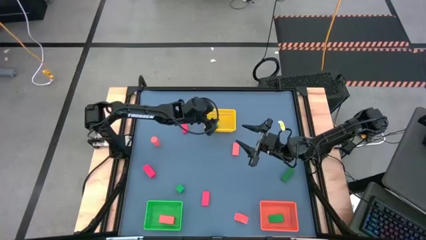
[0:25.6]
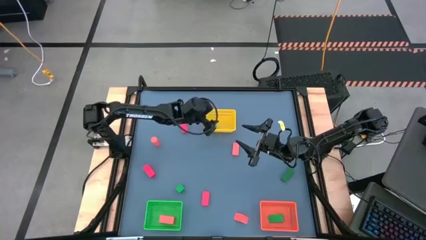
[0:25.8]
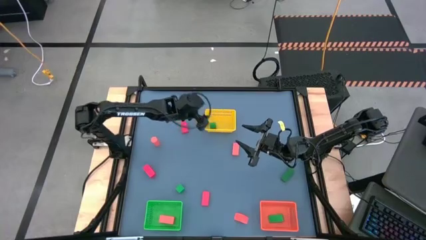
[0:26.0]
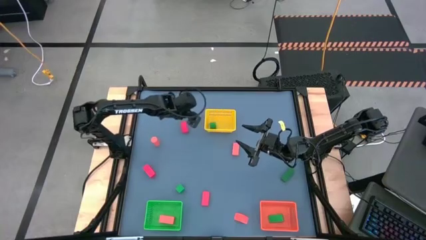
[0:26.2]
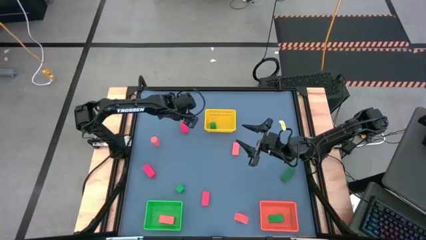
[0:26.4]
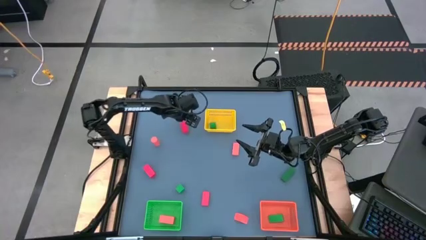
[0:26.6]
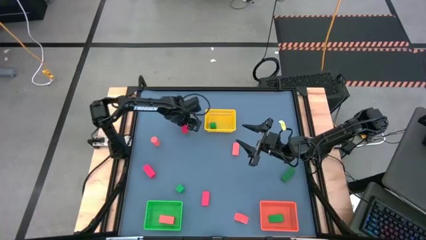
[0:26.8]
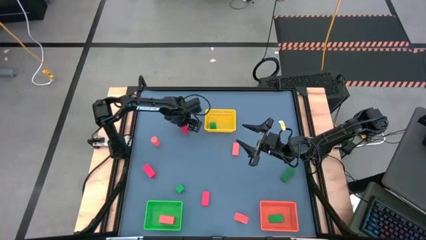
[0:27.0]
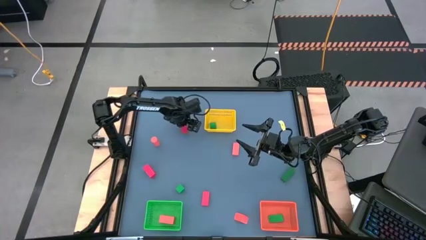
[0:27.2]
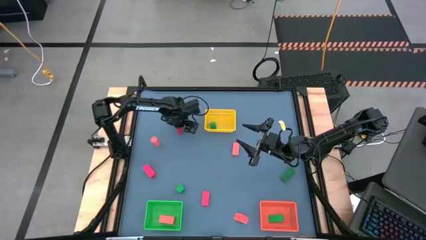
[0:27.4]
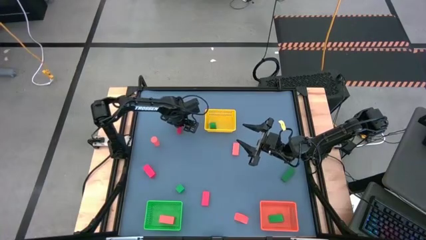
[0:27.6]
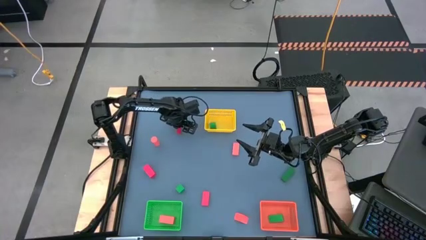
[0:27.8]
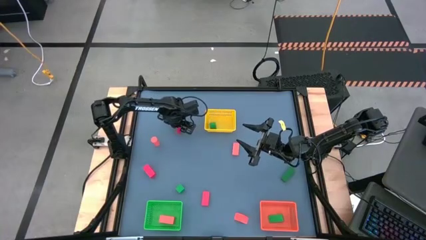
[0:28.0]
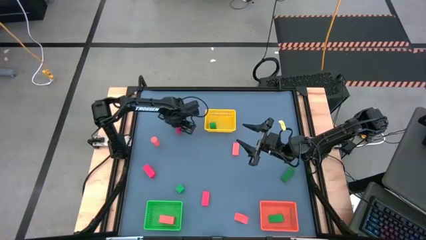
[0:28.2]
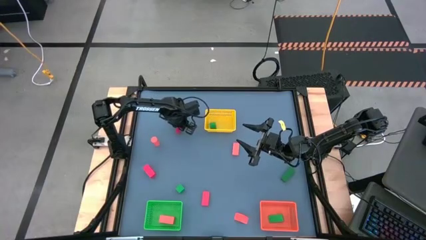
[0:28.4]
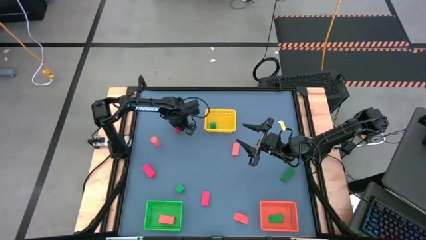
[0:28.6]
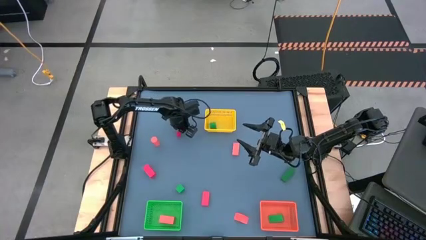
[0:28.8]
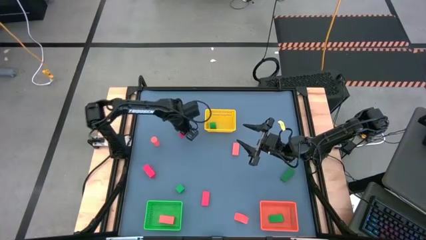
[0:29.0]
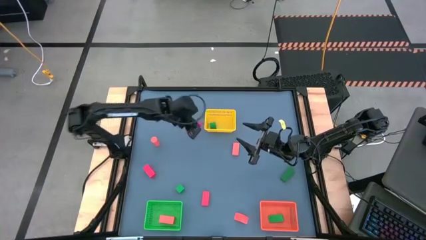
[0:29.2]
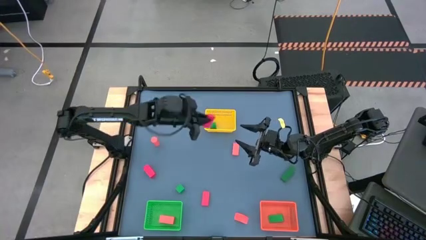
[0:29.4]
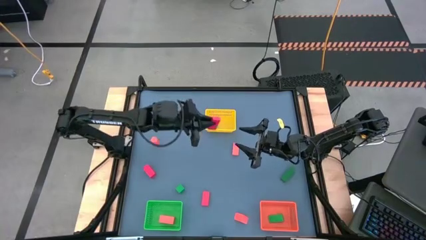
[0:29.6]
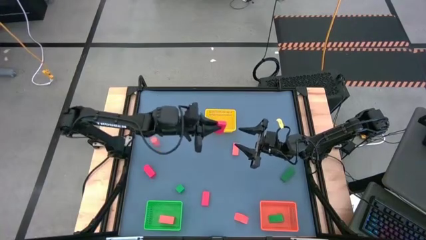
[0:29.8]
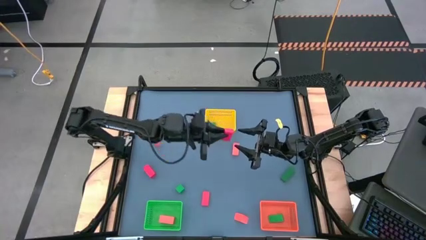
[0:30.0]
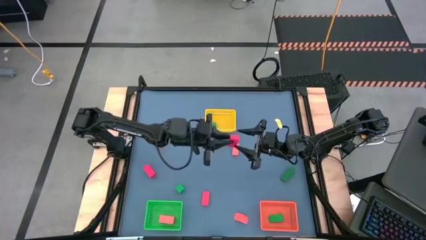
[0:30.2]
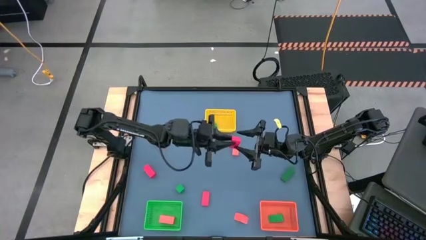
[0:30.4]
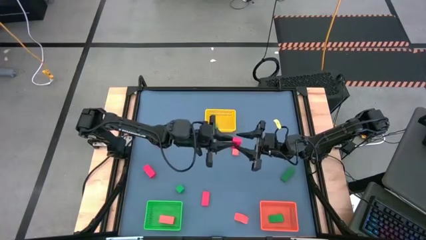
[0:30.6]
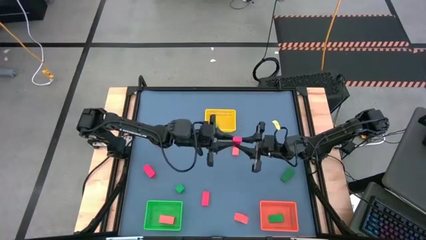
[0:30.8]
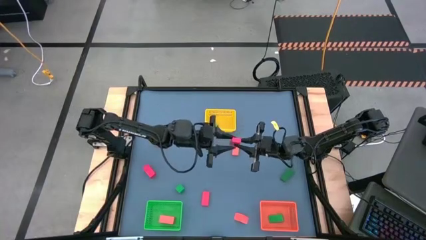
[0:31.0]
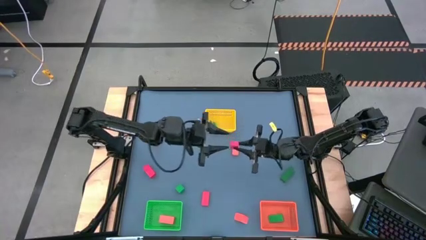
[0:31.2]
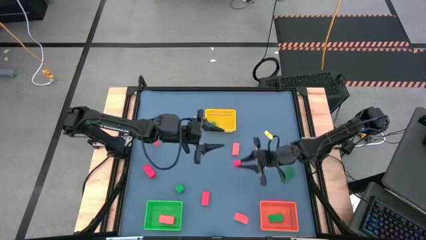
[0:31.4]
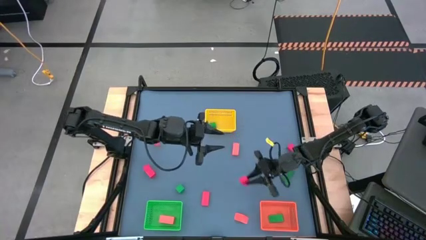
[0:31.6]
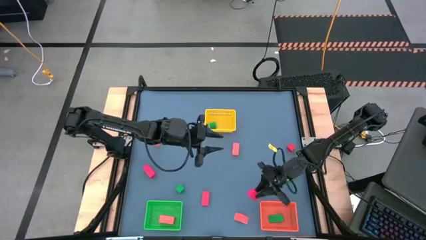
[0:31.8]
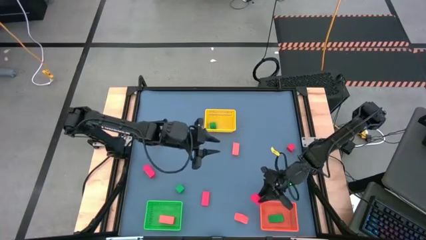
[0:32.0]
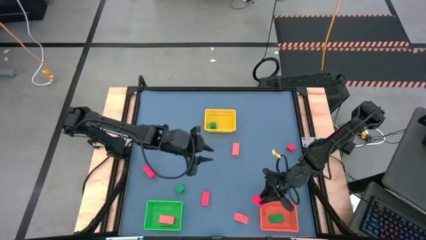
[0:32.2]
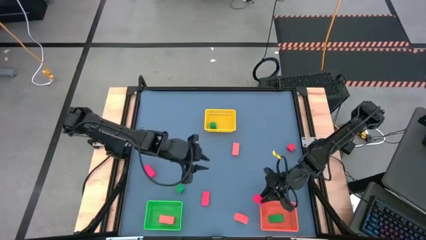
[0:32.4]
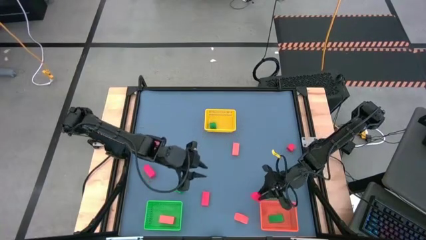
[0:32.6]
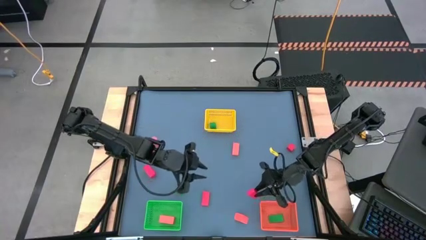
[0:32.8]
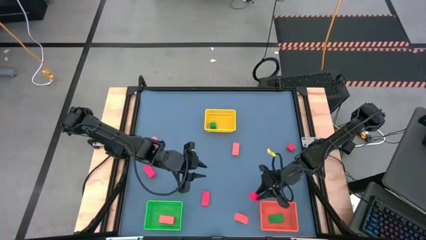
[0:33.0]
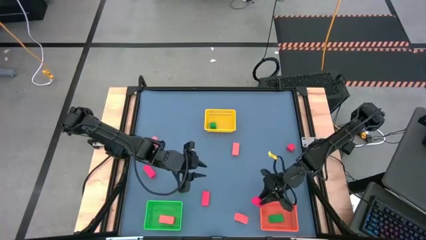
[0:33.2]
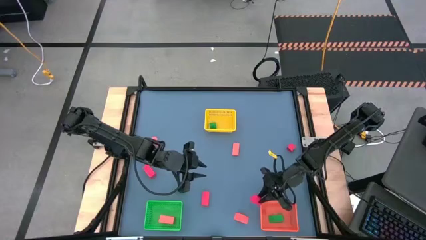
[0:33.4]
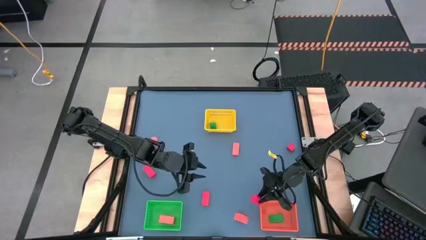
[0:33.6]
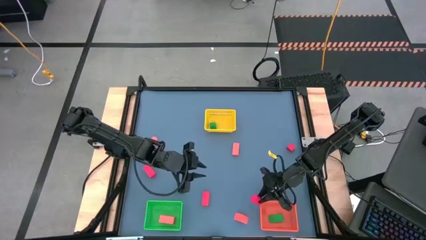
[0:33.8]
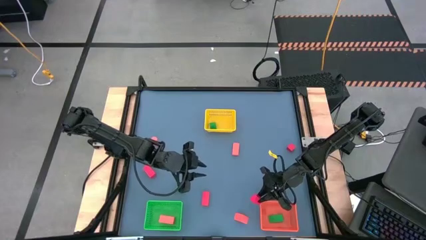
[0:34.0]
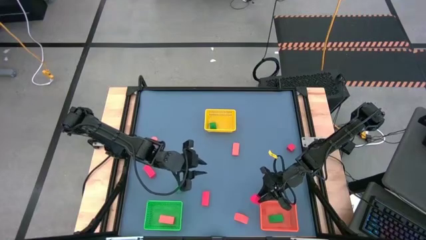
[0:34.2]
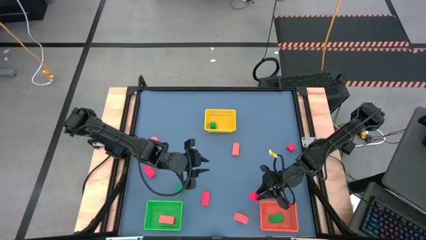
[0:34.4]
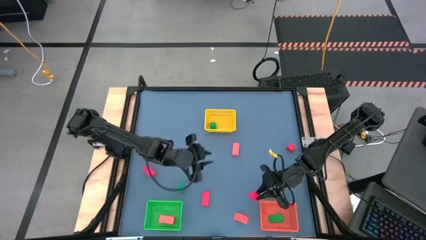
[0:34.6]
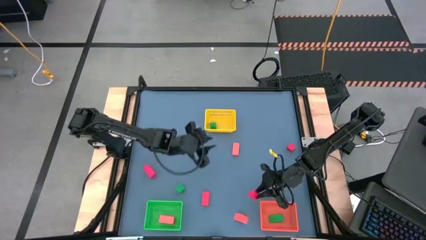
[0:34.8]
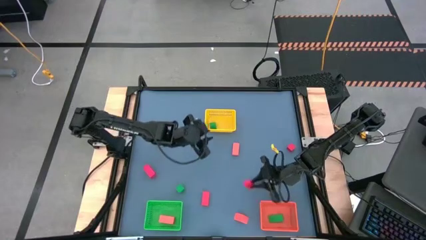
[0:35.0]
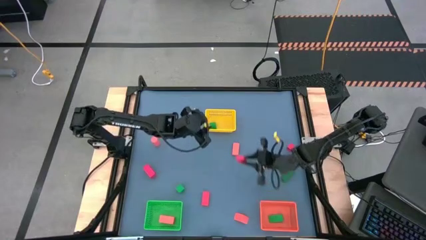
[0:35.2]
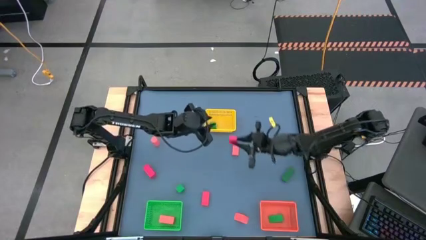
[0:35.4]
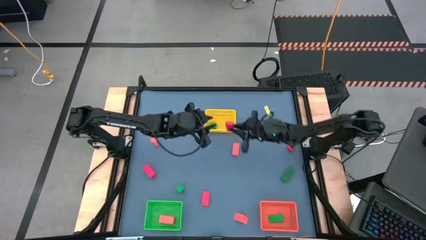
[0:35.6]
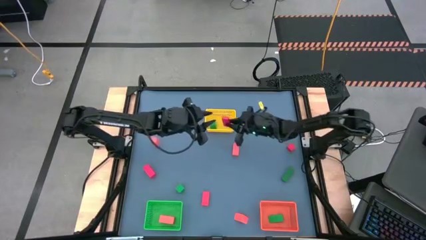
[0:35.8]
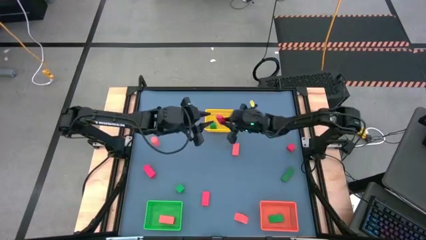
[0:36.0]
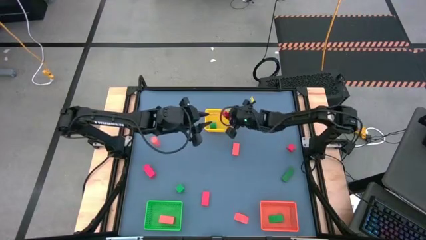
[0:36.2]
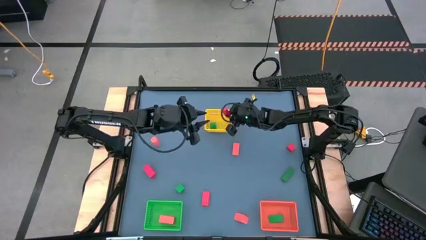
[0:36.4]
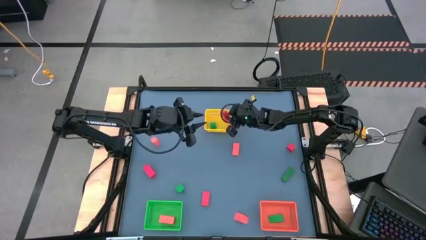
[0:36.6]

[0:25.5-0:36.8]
Task: Sort & place blocks by color
Put the red block into the yellow bin

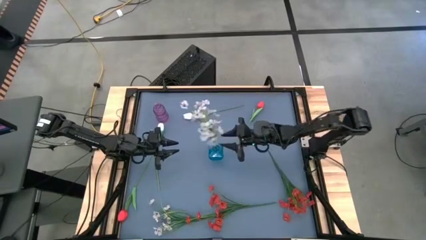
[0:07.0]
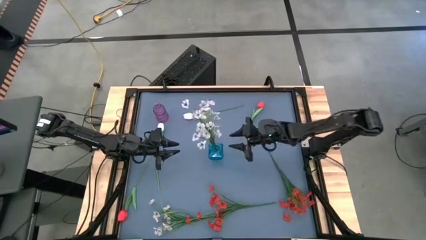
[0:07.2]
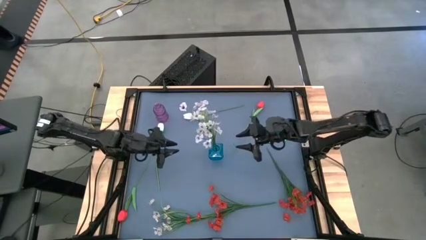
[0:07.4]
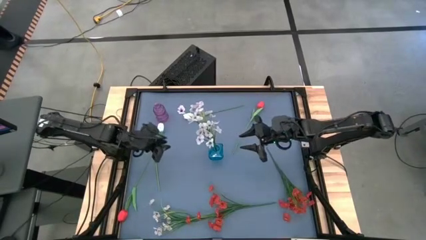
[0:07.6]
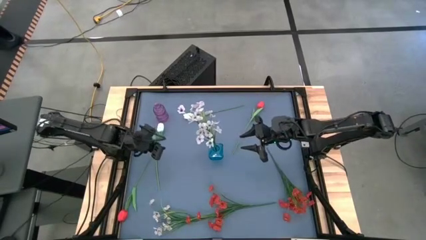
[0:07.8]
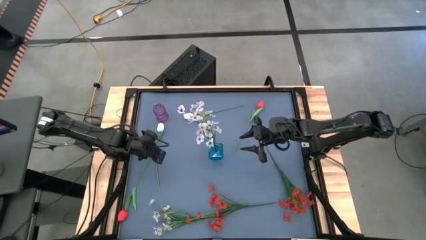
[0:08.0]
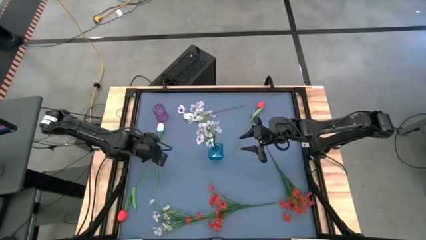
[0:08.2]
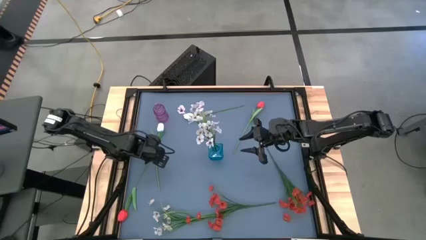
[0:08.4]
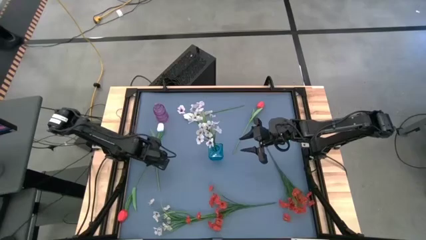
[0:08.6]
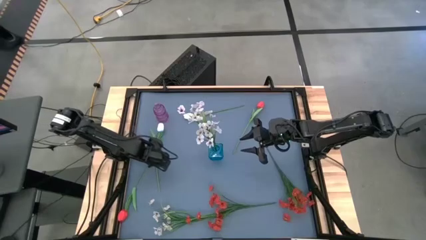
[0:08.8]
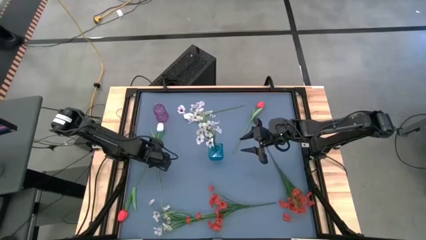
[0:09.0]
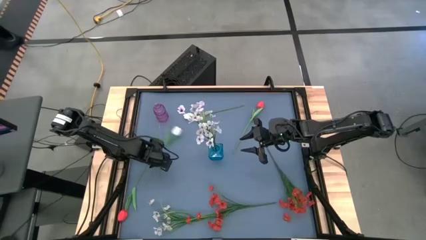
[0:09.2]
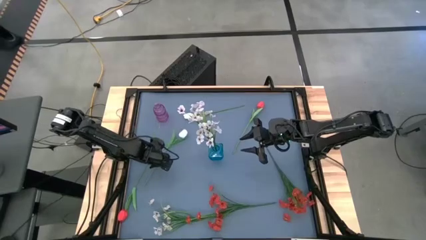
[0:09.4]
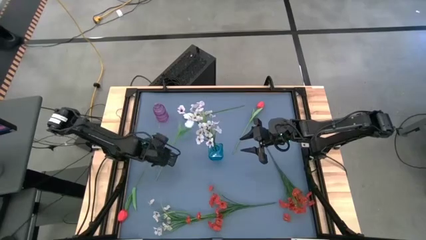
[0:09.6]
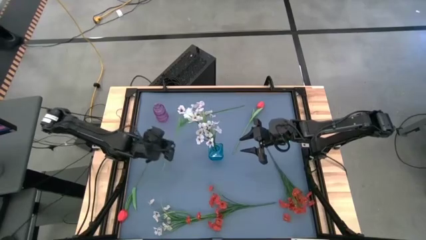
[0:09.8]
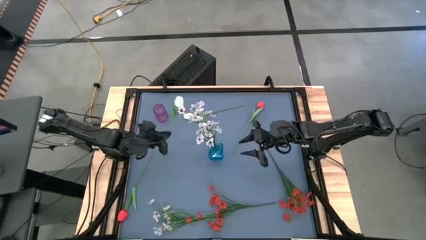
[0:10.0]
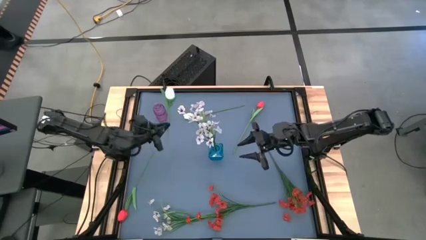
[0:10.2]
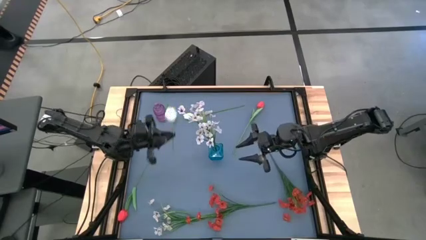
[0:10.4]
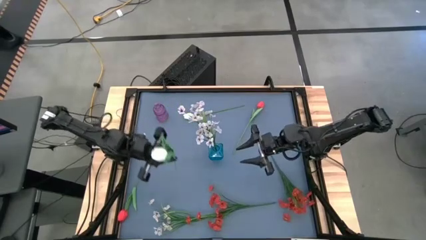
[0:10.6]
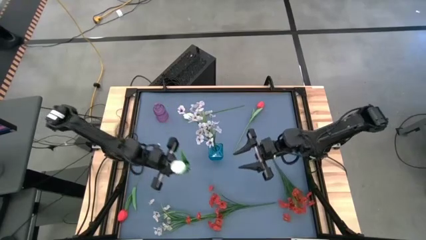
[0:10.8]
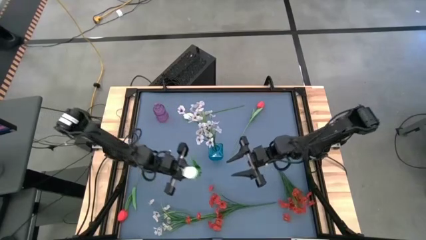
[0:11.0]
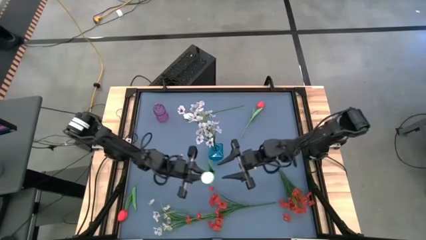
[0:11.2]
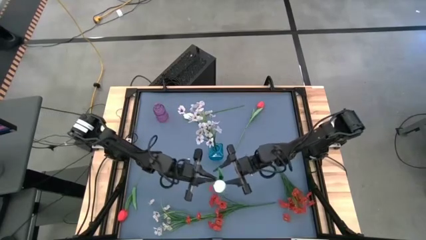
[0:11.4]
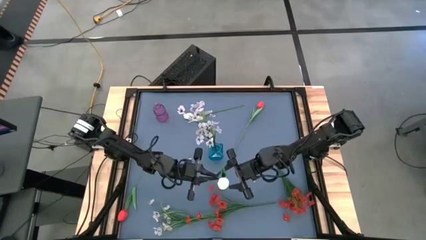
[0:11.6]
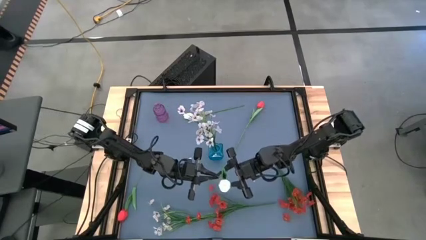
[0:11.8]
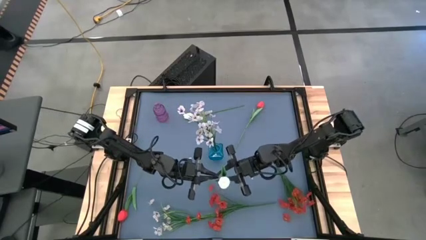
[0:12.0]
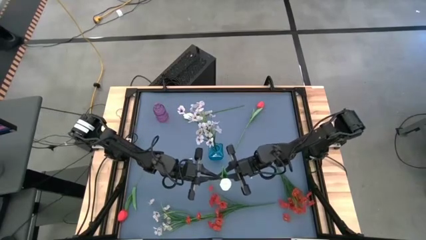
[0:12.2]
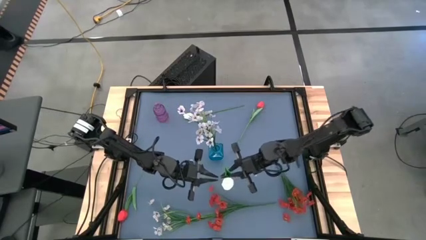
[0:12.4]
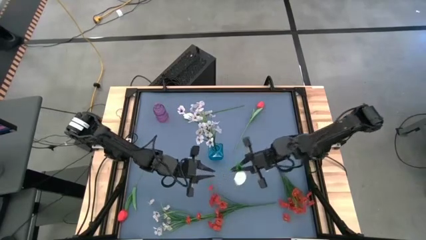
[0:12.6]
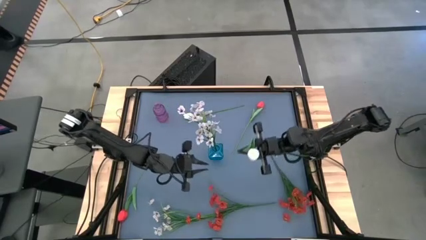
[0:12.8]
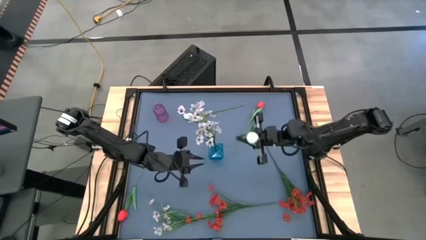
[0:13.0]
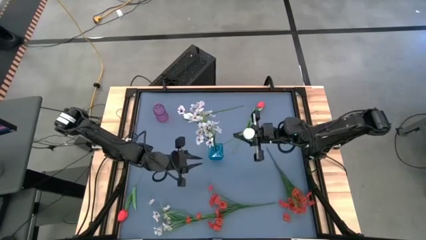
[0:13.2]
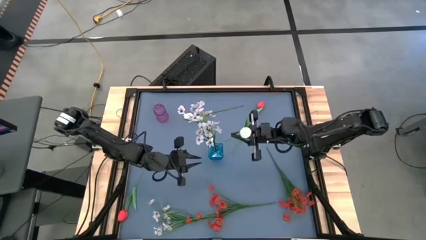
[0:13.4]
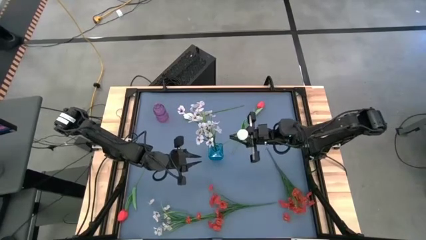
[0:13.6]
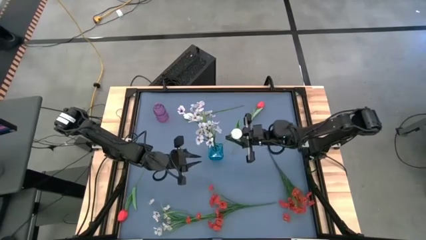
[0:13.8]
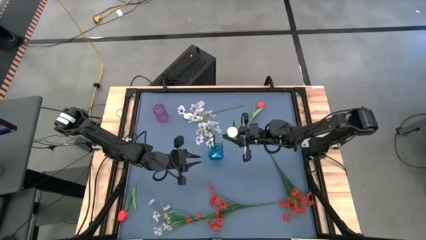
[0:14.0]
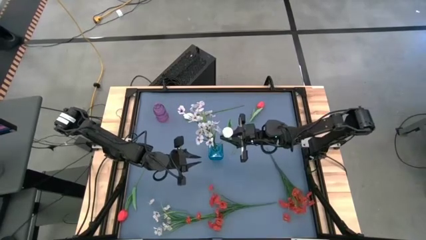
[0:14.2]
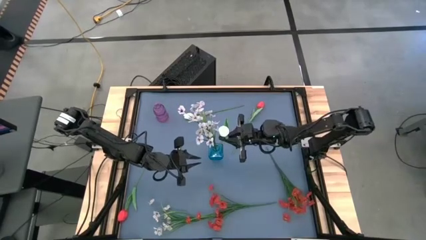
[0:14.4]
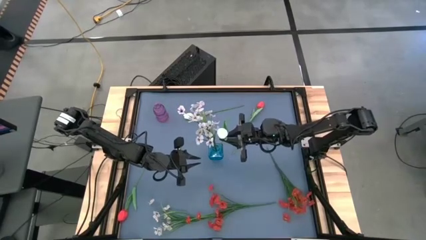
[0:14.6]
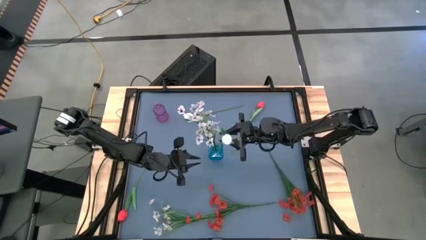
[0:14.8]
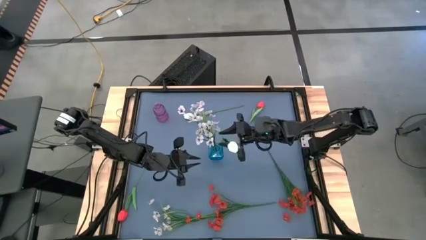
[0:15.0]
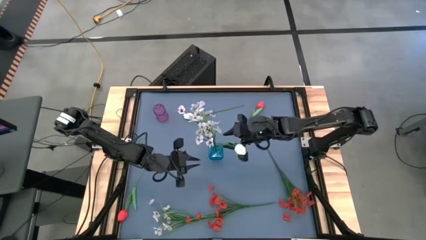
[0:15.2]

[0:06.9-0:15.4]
Task: Sort flowers into vase by color
Put the bottom white flower into the blue vase
